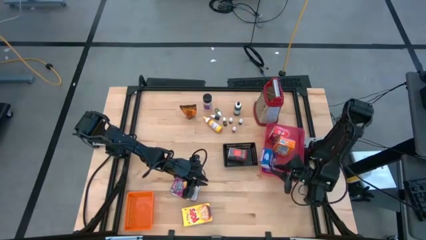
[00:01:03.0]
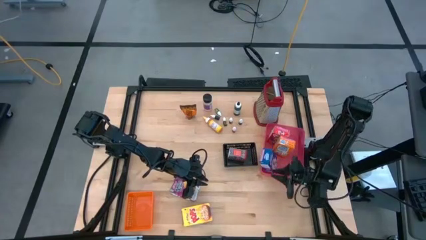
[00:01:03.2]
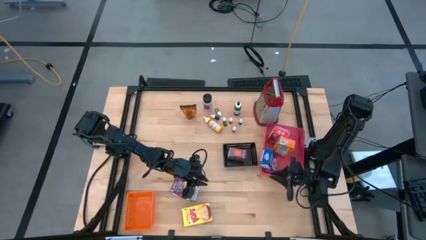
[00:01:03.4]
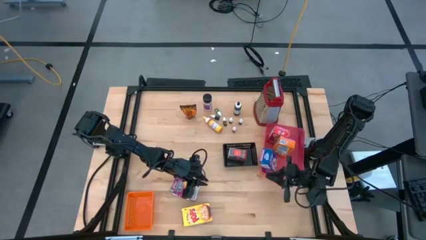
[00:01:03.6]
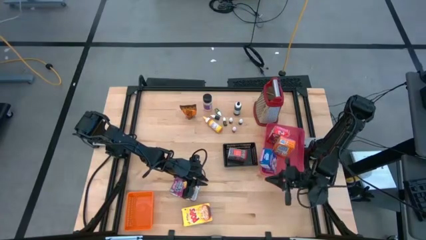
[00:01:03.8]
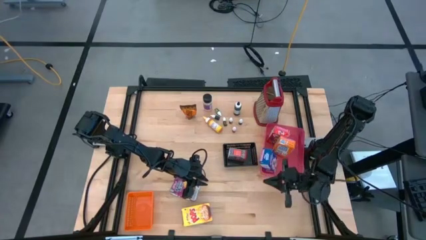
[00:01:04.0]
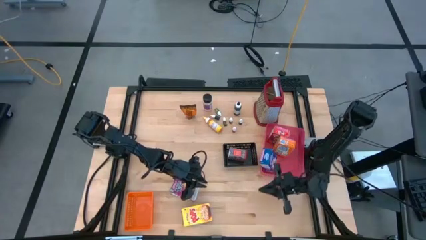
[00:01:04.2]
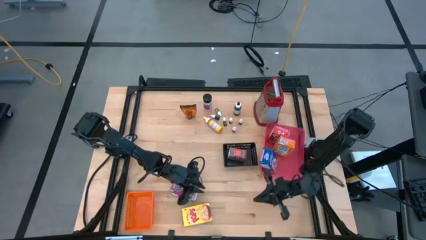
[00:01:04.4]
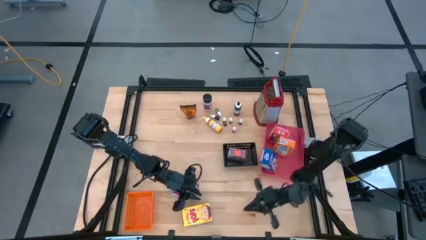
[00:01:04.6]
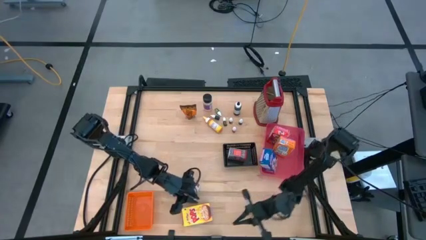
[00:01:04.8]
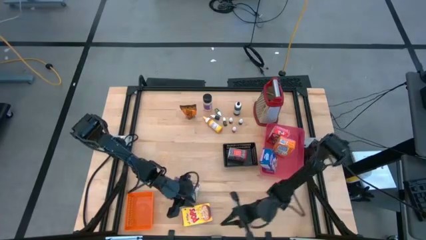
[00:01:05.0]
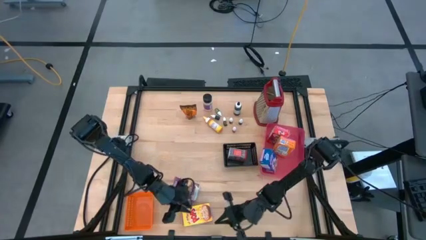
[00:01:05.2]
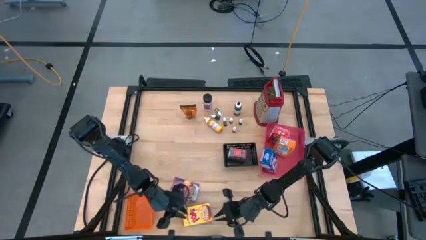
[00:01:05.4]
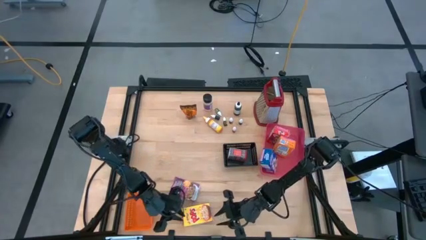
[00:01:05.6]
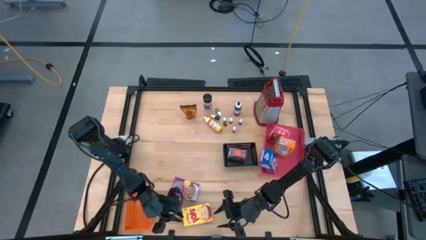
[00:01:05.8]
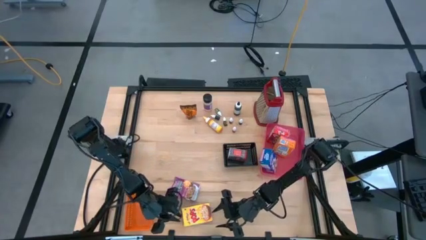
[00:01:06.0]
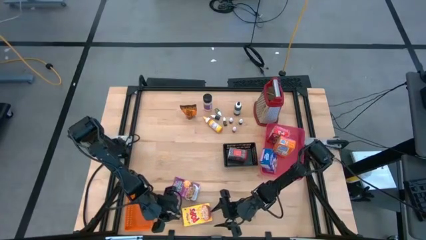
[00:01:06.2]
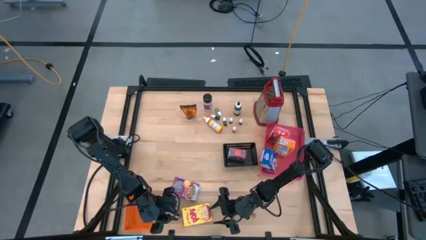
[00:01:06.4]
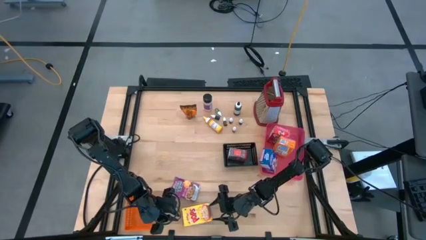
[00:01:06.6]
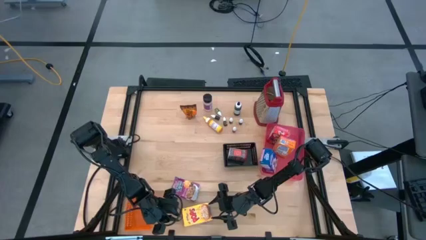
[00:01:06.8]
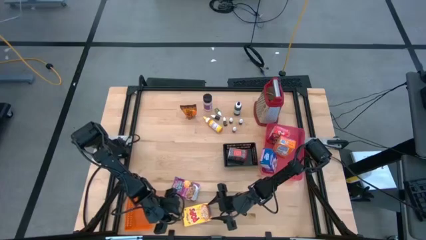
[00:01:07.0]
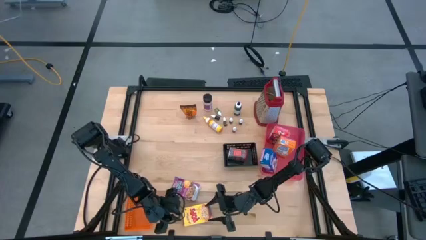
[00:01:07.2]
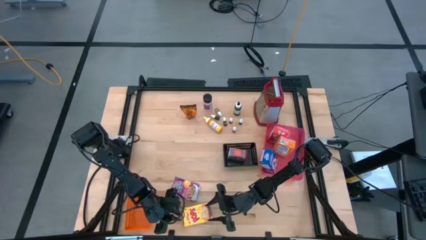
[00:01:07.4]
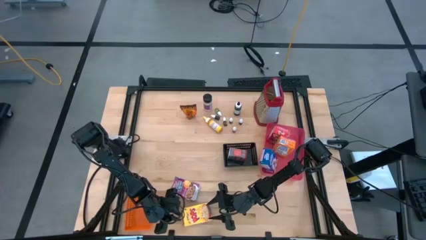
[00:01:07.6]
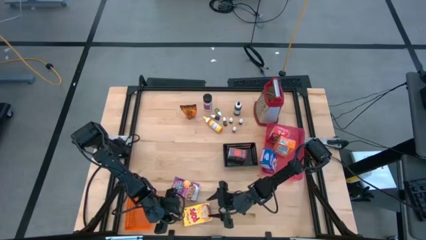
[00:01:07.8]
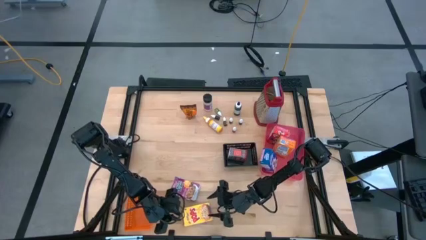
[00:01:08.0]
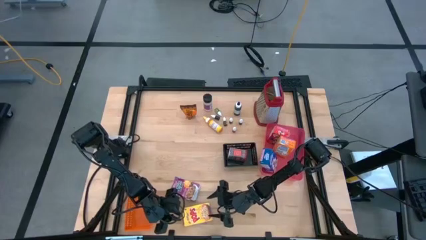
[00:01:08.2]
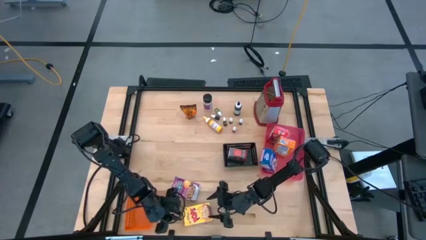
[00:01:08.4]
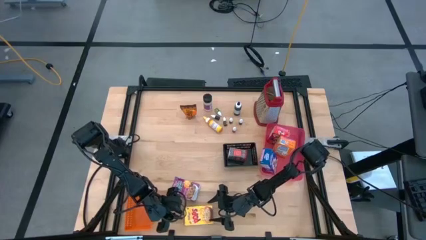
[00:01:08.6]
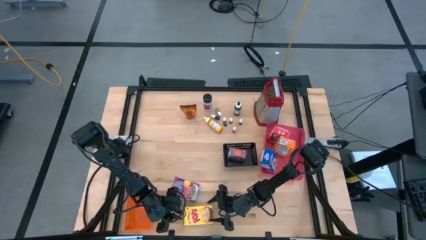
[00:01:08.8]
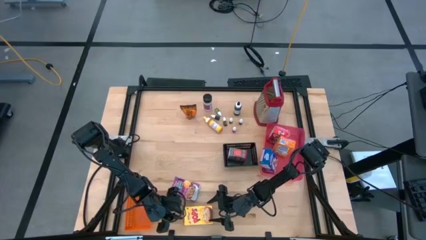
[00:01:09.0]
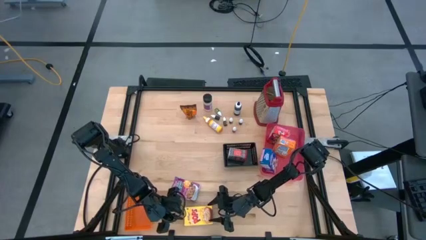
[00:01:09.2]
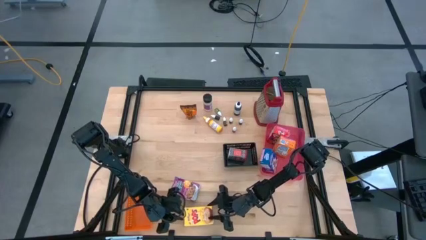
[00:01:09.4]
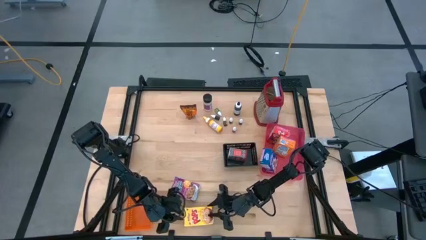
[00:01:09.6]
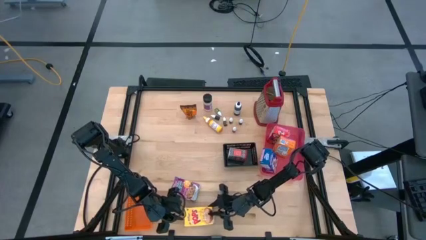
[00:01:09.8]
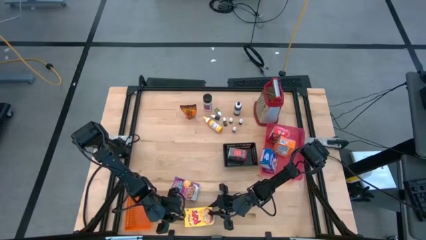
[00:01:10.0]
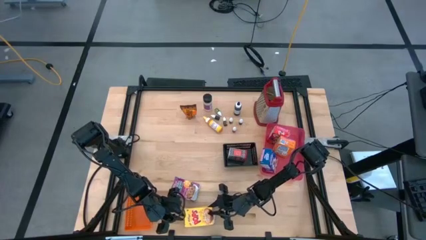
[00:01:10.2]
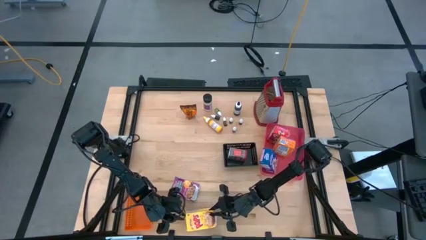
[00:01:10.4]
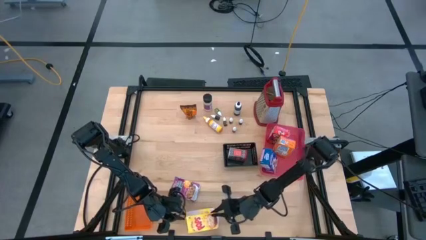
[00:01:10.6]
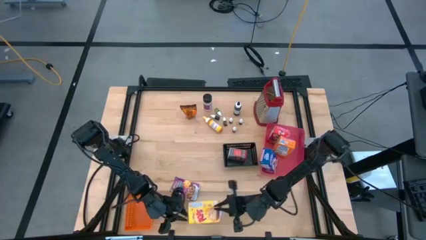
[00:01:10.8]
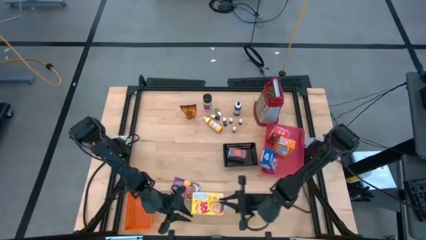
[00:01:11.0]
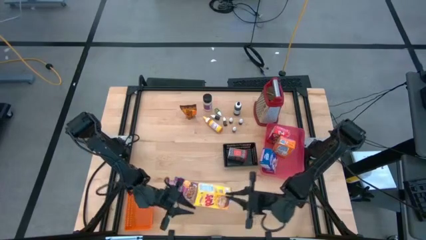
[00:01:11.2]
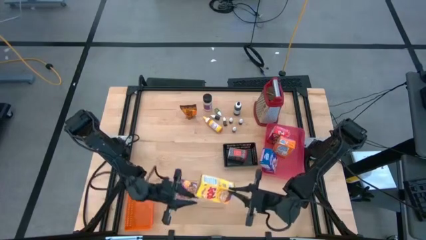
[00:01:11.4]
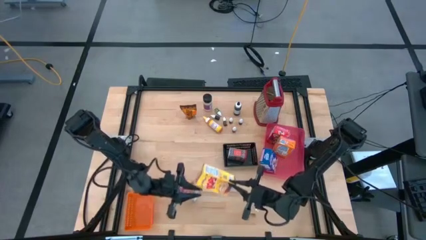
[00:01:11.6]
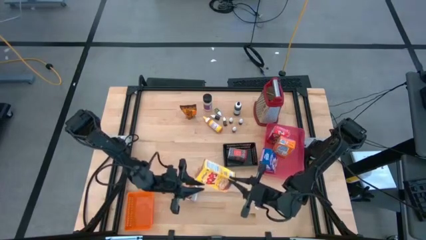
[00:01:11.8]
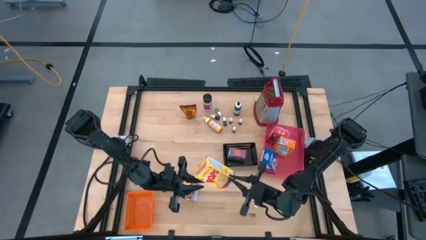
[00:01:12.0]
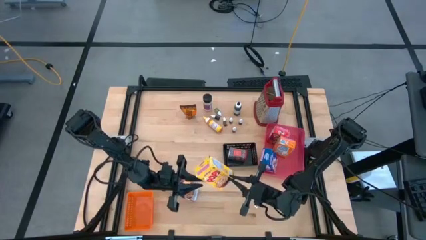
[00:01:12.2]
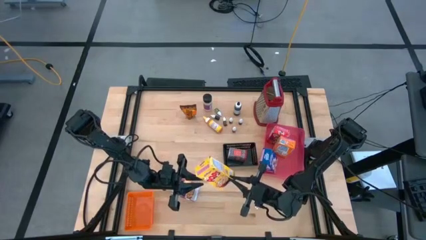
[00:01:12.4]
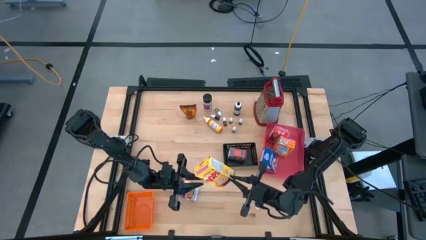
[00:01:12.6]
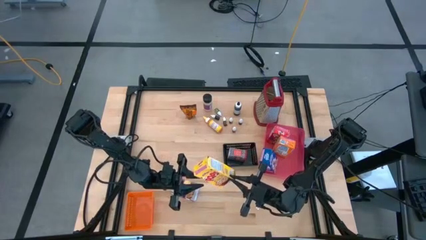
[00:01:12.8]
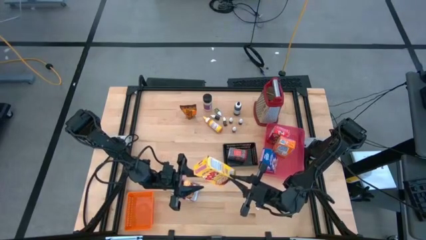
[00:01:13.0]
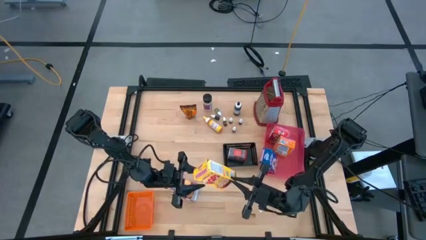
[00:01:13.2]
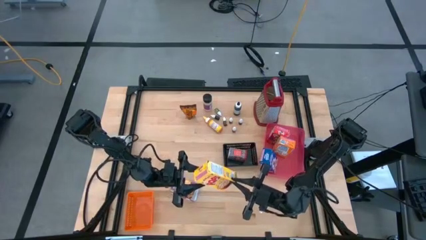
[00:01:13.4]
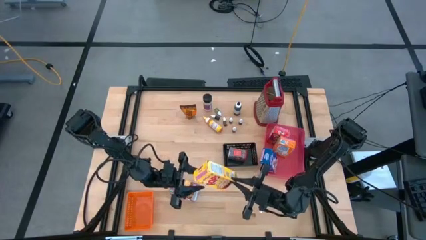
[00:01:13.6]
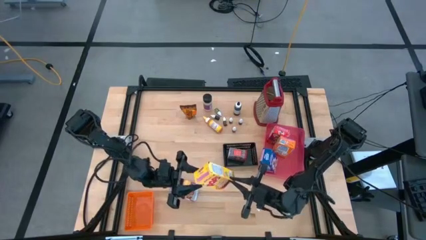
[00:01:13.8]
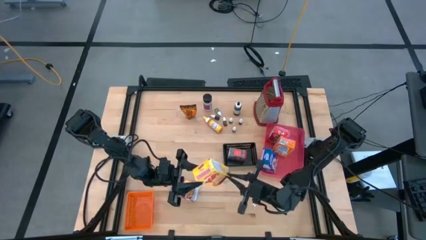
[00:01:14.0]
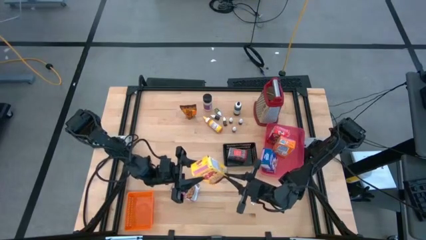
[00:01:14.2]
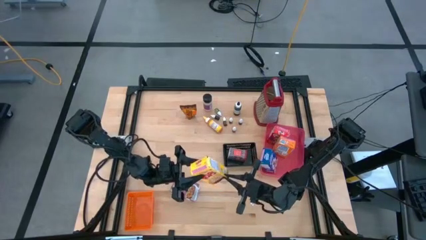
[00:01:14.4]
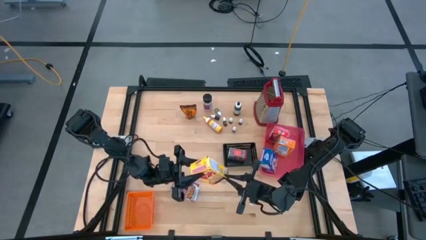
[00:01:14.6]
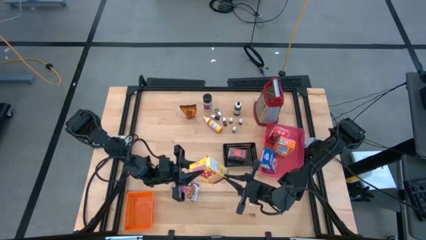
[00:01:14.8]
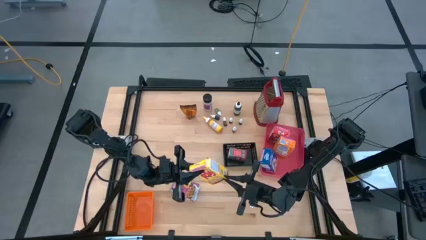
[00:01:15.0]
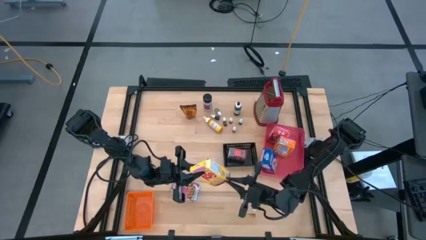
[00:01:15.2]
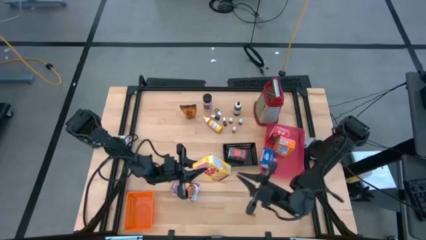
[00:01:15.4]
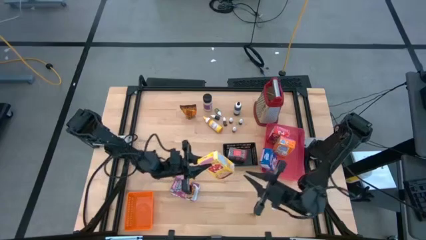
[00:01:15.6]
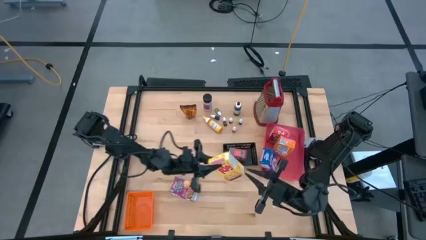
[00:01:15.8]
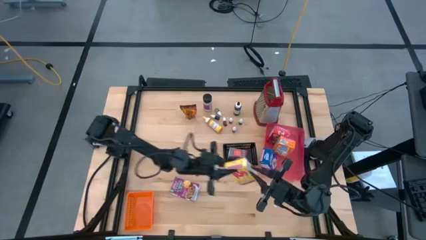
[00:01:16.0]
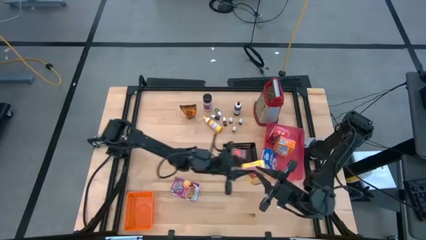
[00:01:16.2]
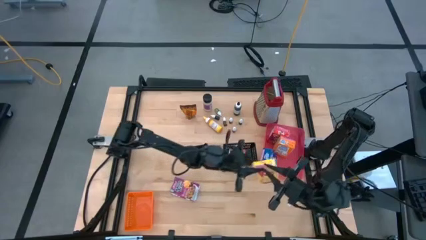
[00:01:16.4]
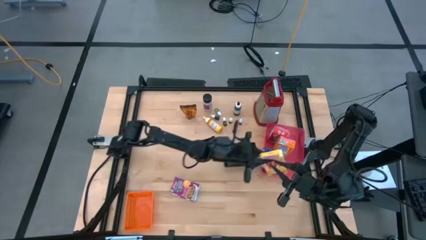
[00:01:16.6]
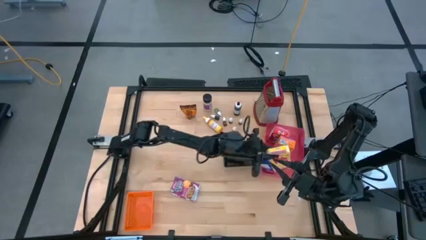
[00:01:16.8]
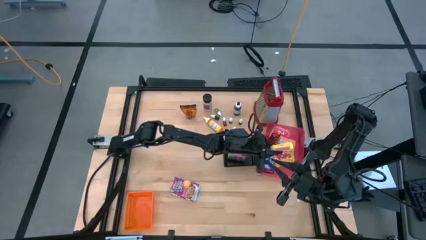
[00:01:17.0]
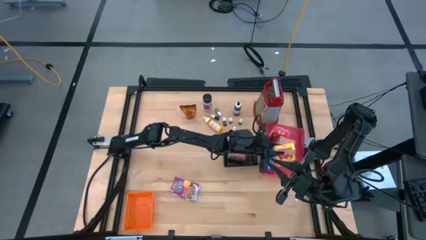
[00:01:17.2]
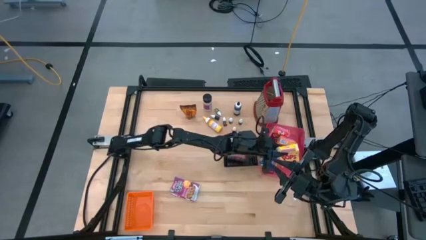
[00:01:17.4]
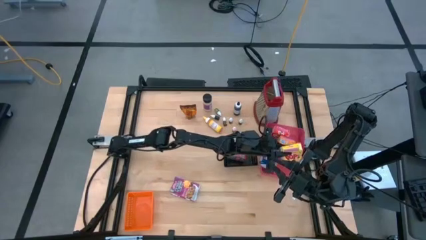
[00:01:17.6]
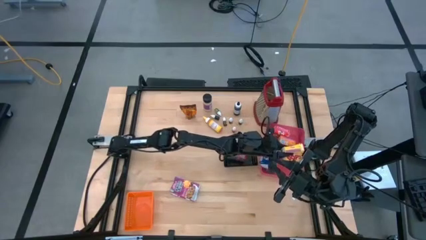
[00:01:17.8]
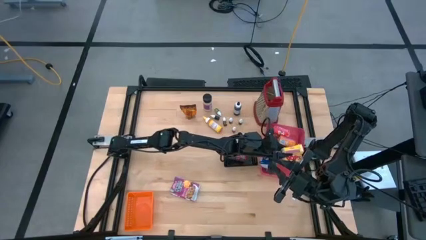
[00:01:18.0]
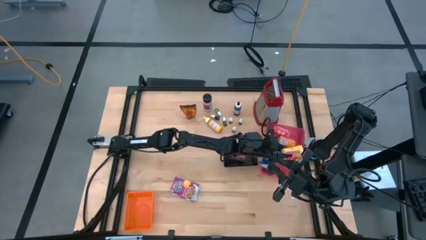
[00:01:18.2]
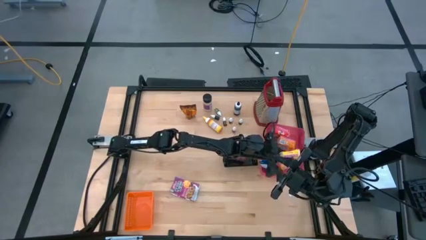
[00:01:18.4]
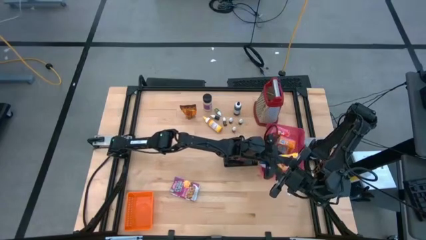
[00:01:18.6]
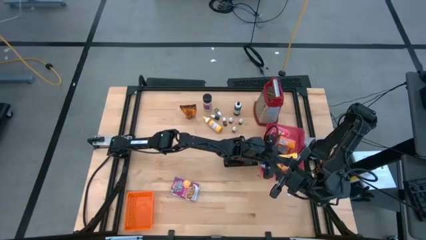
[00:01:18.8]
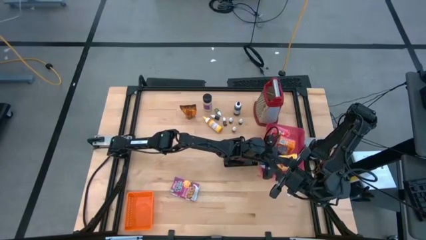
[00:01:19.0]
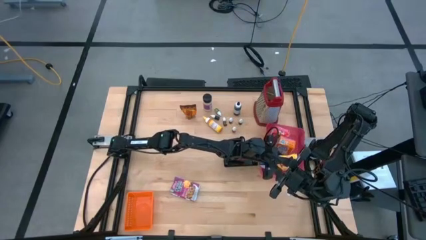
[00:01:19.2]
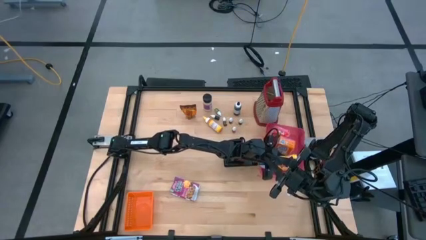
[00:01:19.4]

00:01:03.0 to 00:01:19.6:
Task: Pick & Place Kitchen Items
Put the yellow cereal box into the red bin
